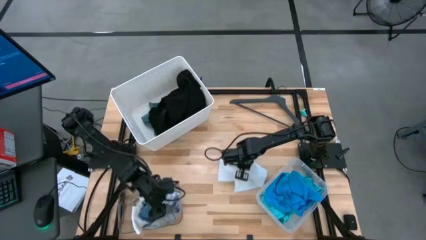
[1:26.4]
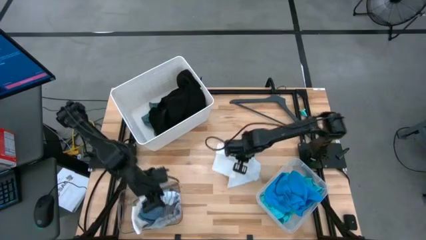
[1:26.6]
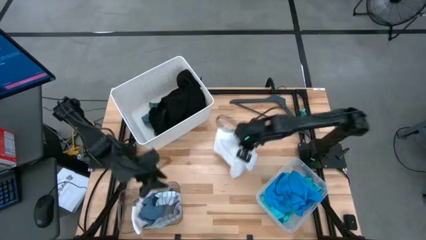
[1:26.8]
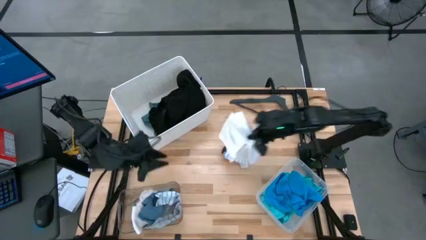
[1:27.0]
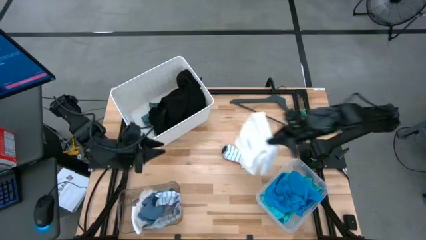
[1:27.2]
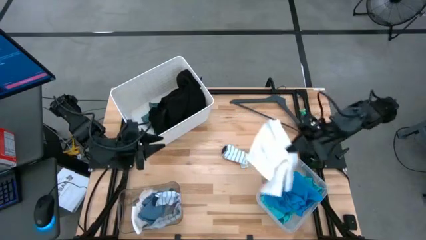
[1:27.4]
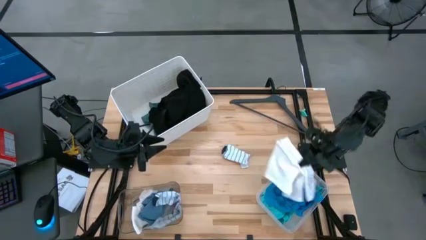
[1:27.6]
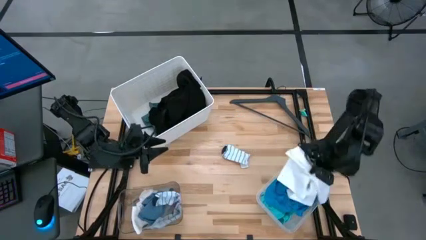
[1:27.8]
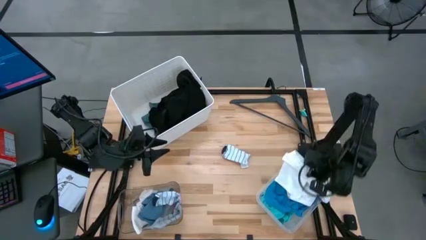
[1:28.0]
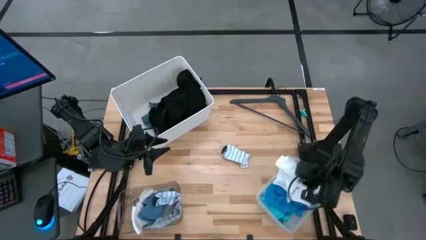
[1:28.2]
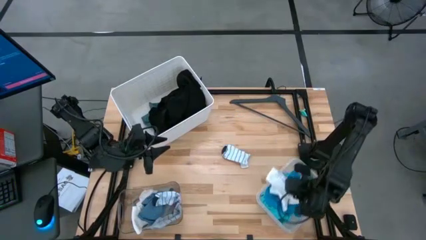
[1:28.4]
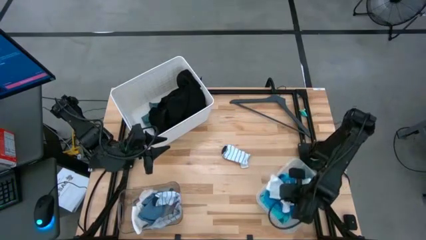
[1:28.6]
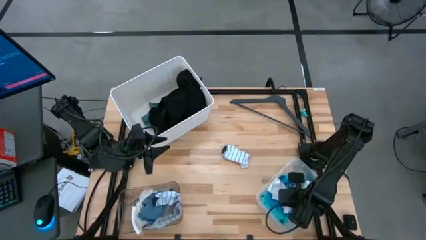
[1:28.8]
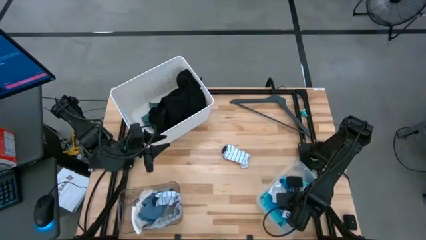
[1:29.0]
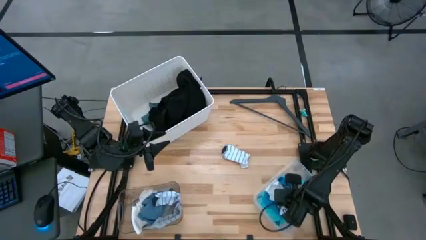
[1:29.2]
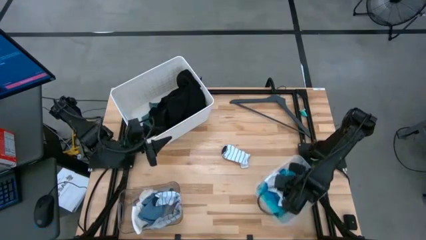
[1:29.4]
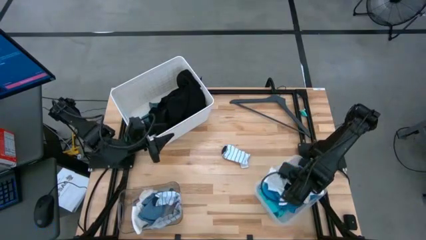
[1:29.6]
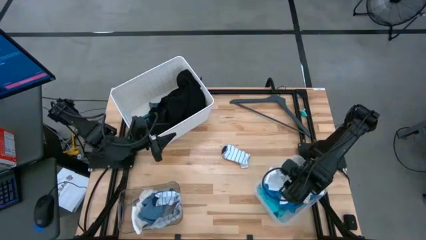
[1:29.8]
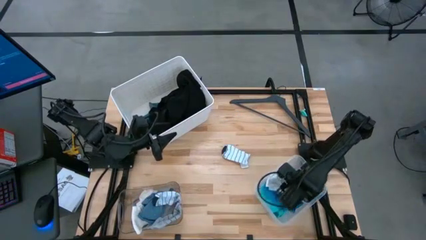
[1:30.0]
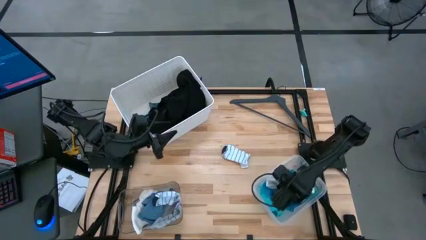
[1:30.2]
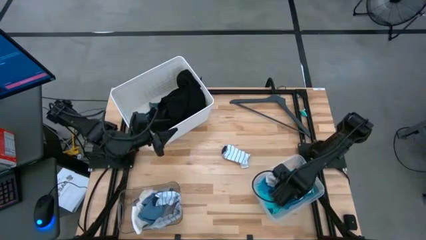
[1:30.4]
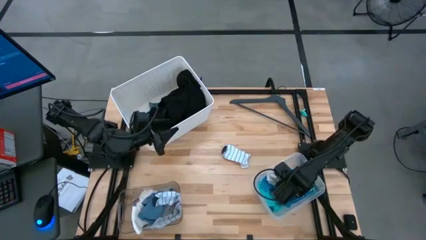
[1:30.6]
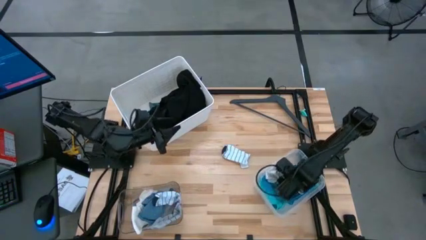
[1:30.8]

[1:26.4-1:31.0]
Task: Pick & Place Cloths
Put the white shorts into the right transparent bin

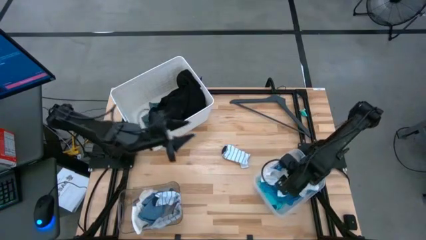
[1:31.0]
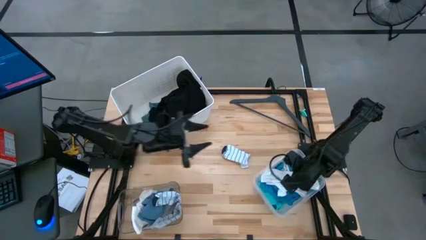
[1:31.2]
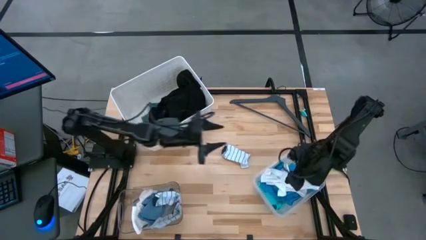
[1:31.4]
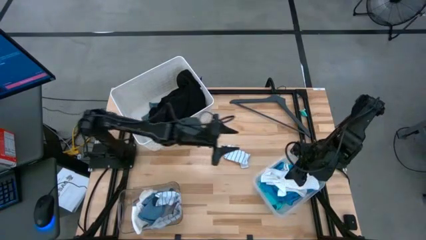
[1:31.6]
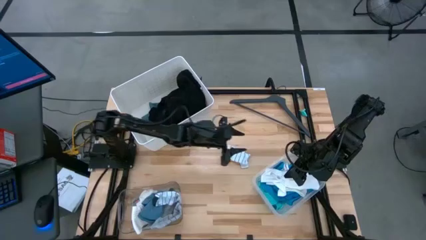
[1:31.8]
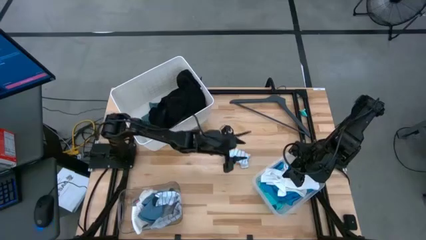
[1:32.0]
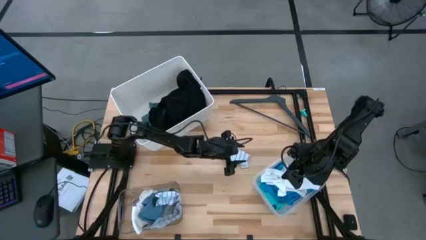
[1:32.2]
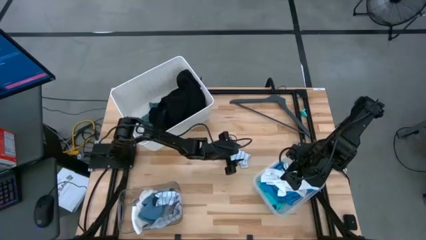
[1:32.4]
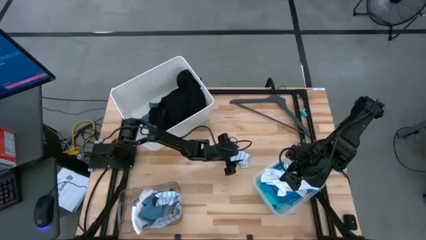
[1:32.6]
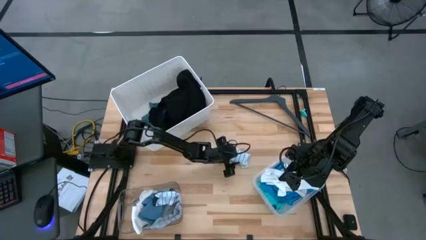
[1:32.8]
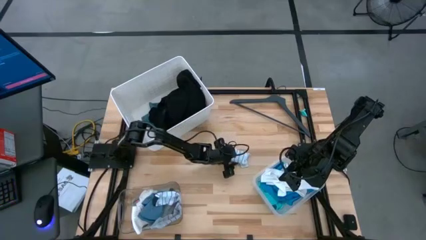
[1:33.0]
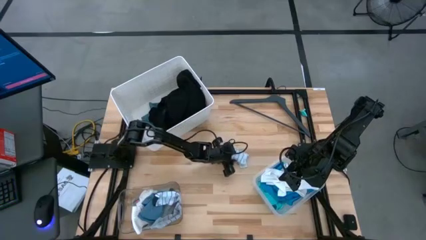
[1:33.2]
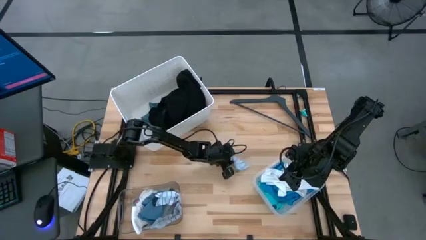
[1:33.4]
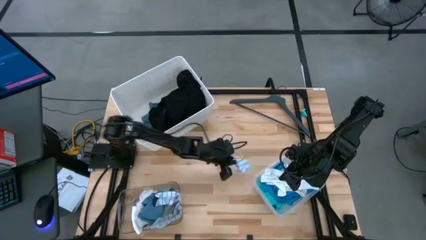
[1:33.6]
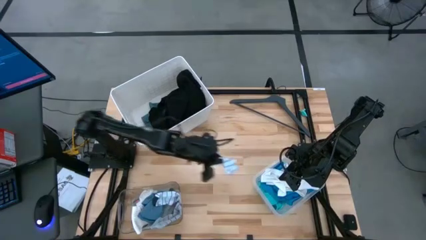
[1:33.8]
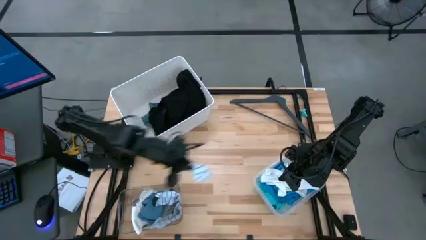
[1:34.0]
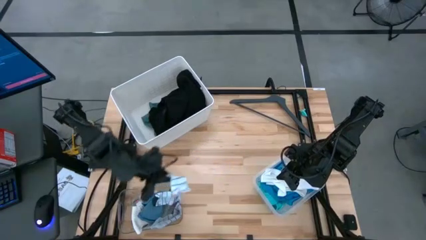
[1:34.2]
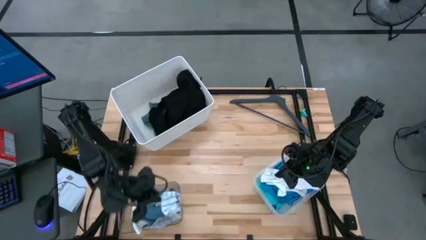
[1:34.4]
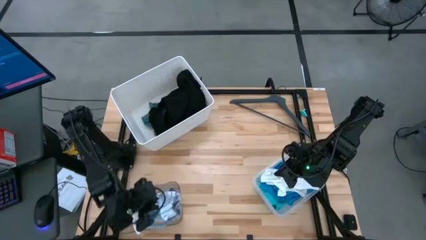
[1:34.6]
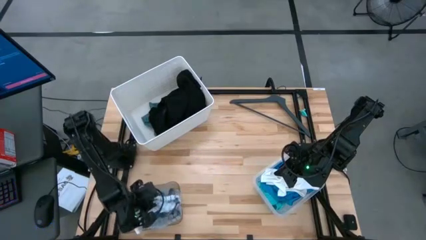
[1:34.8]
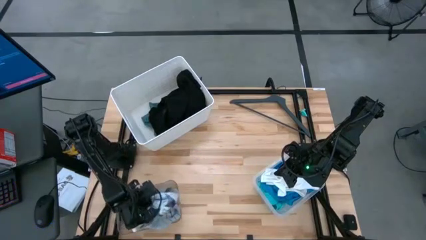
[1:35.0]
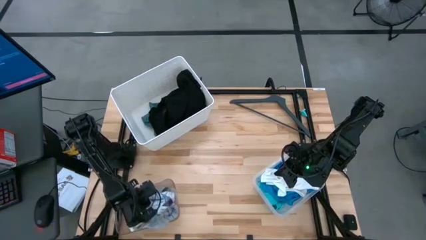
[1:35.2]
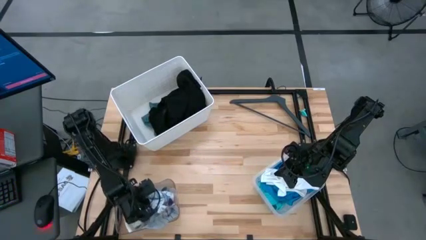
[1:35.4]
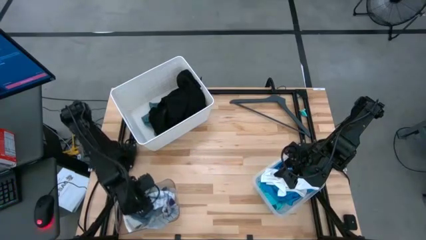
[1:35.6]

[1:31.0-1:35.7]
Put the striped white sock into the left transparent bin

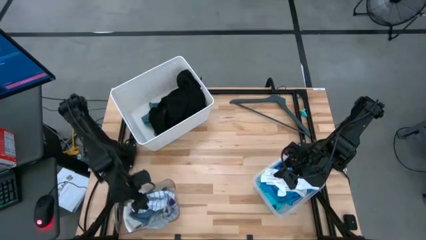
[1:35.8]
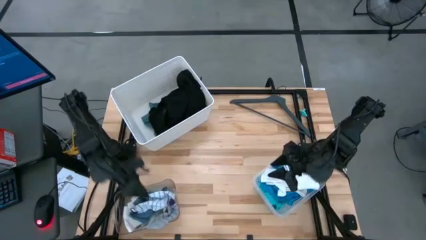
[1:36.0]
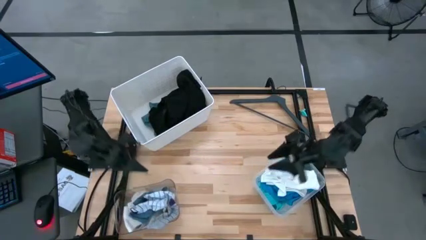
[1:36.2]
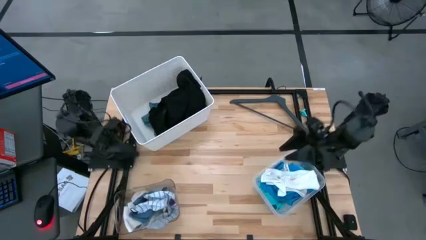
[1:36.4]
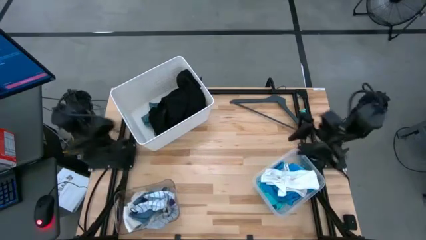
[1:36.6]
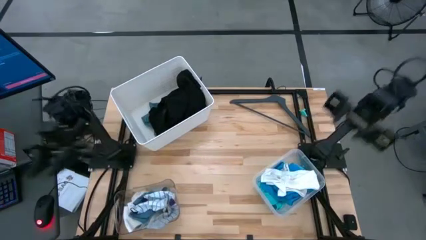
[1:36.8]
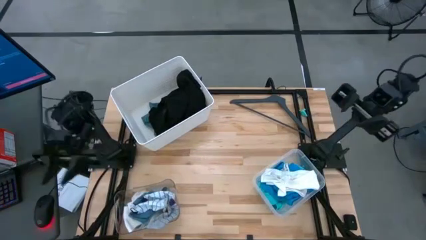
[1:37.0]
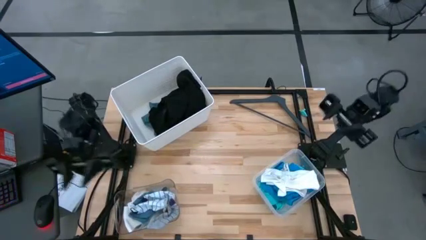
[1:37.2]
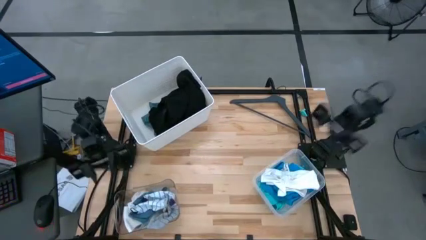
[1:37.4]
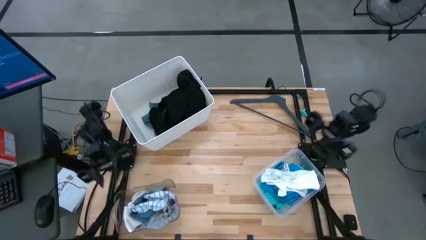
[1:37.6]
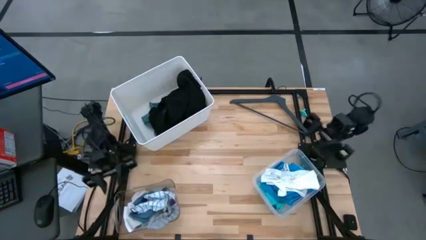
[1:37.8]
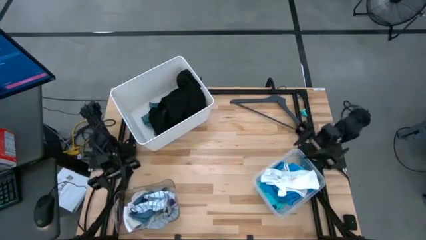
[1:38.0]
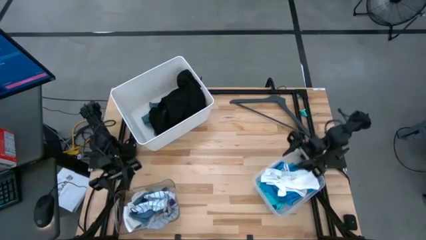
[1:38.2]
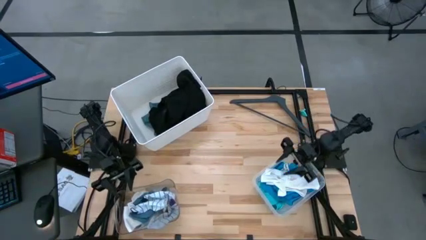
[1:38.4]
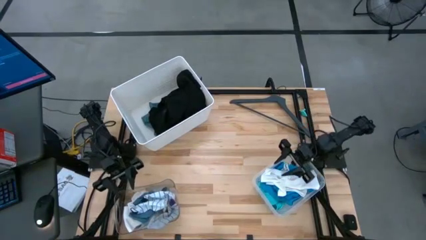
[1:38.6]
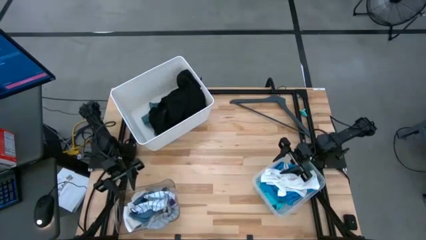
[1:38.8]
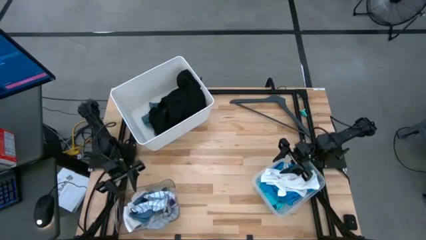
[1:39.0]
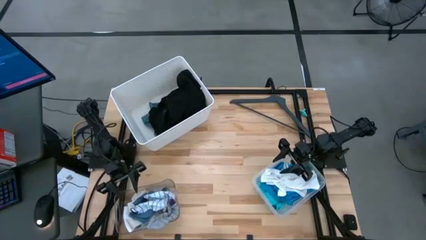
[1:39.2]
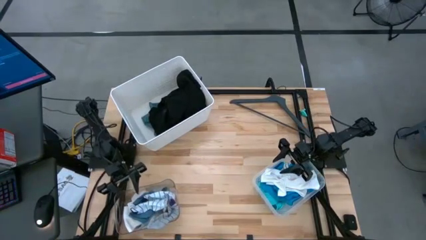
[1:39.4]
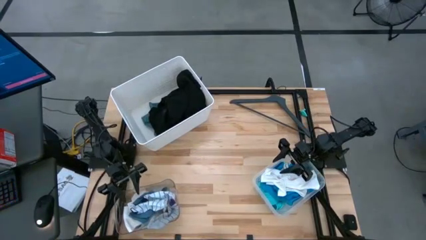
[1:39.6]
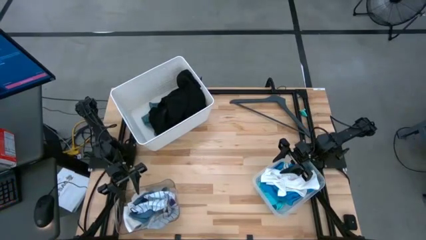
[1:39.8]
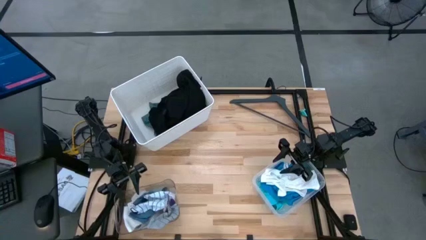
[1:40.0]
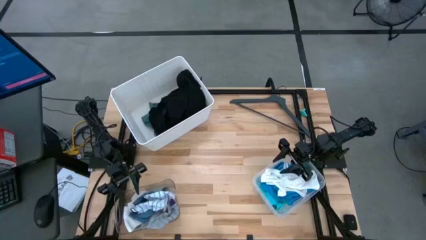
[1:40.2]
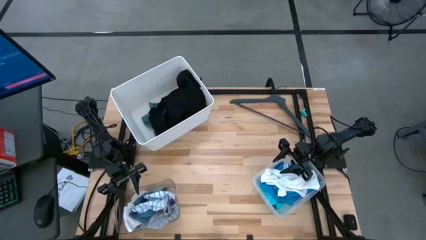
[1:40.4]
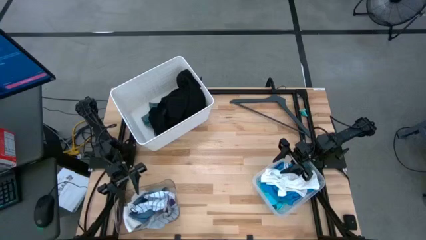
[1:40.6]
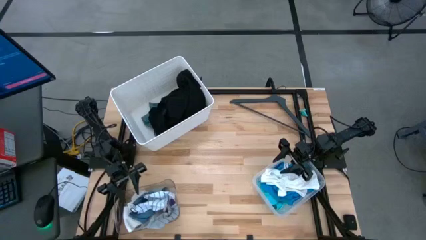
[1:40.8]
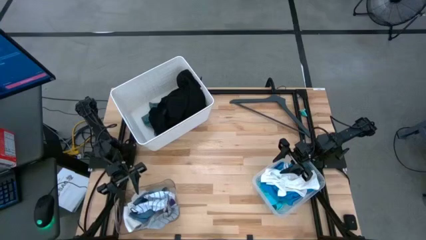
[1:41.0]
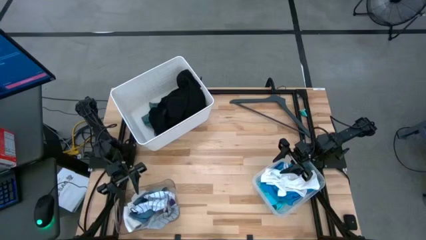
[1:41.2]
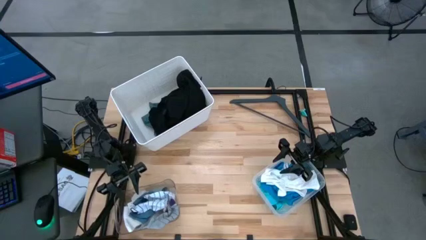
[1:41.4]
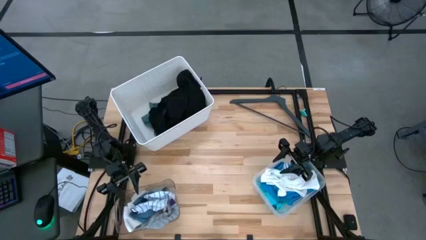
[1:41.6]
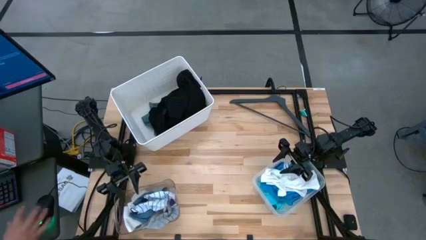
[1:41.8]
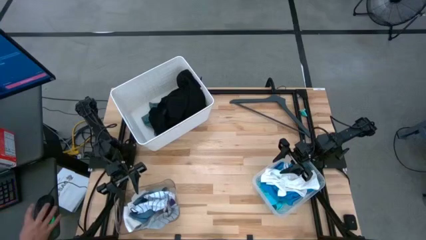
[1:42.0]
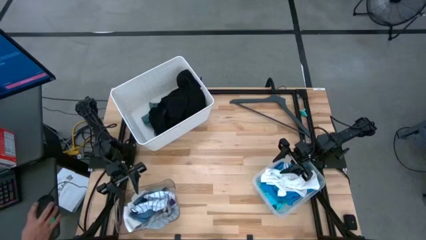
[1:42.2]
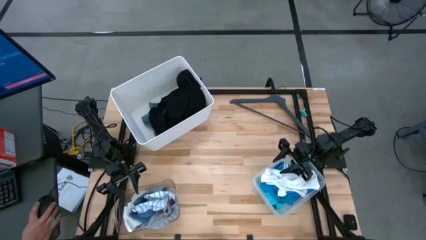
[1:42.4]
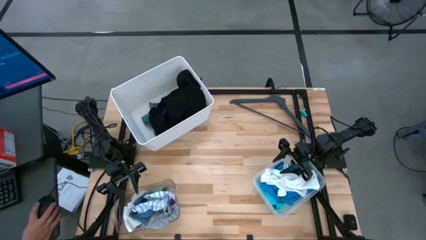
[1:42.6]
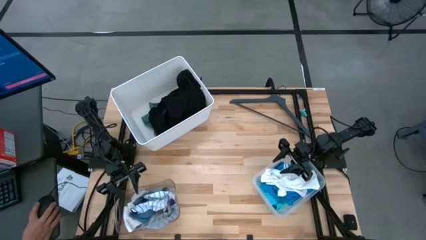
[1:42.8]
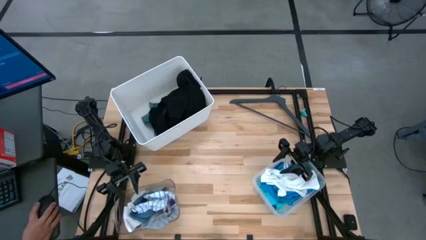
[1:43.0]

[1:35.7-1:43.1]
Return to Home Position

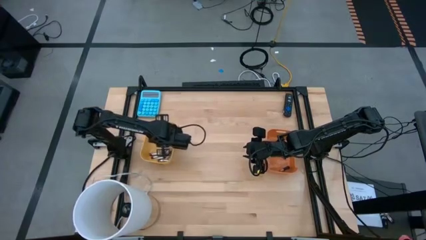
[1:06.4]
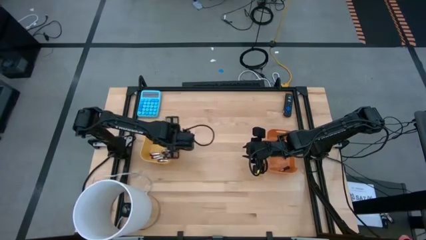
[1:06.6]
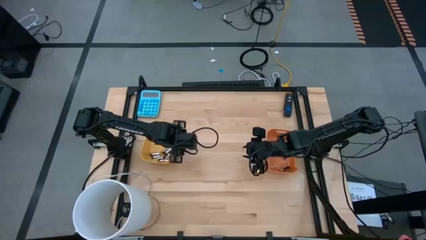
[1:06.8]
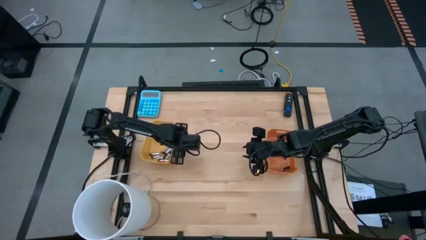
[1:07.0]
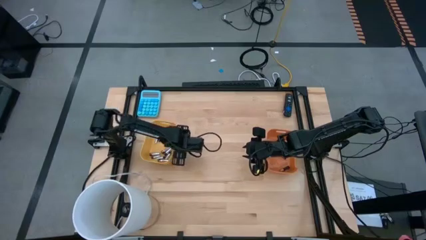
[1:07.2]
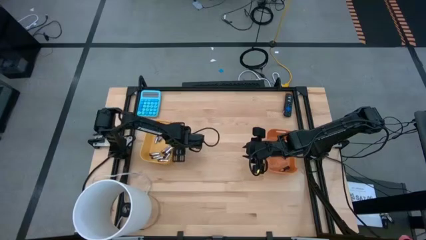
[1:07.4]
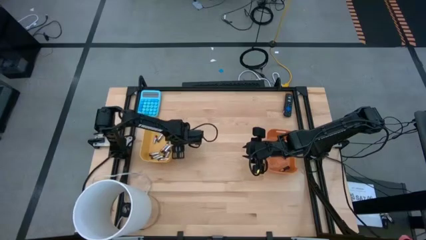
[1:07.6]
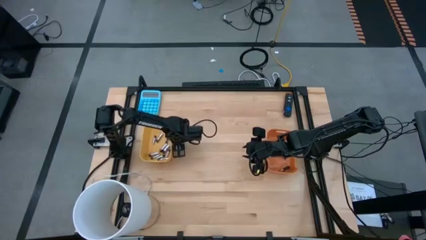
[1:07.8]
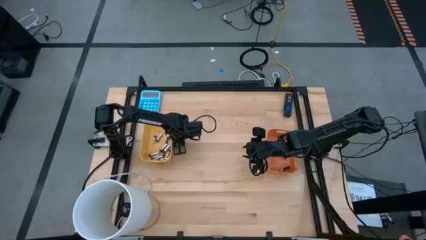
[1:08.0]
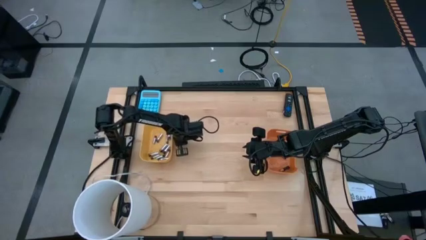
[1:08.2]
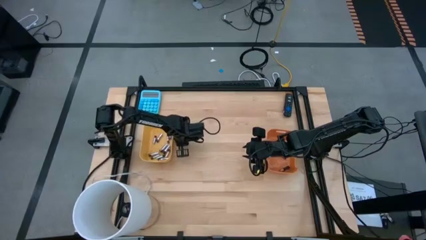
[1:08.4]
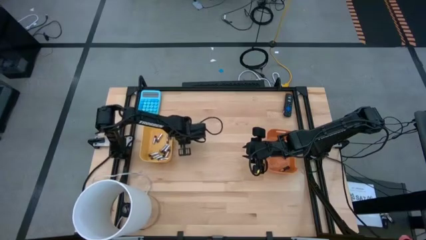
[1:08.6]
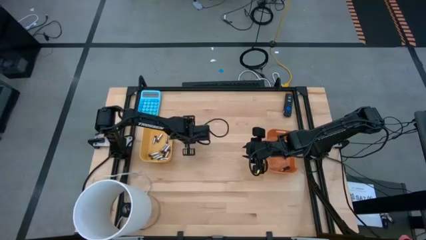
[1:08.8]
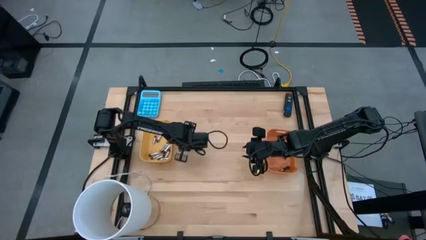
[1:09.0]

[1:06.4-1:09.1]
Task: Sort batteries
Put the silver battery into the yellow bin
